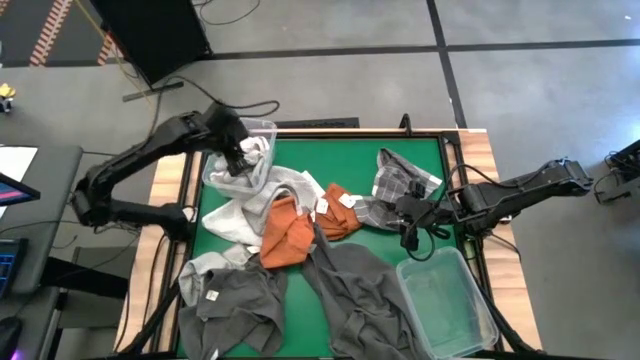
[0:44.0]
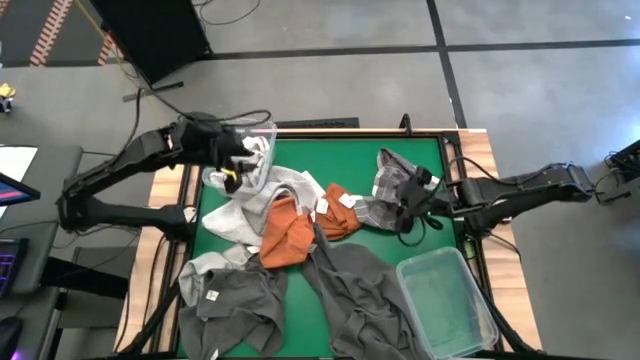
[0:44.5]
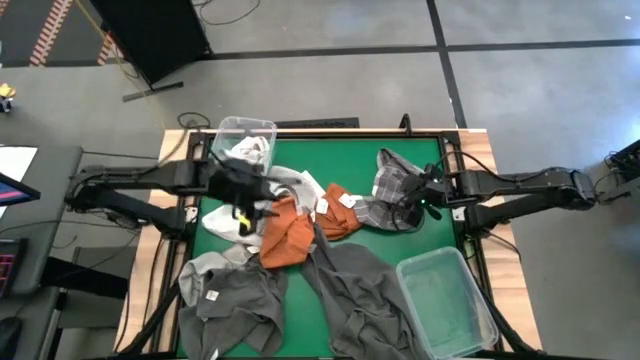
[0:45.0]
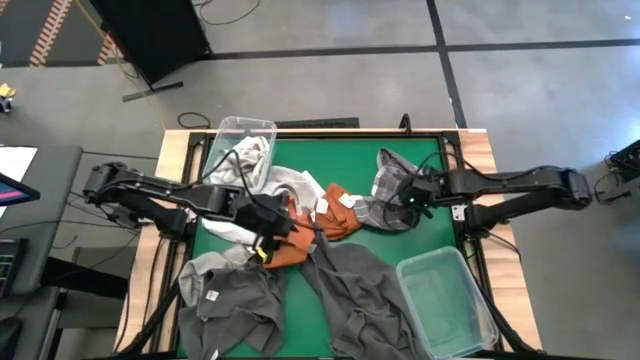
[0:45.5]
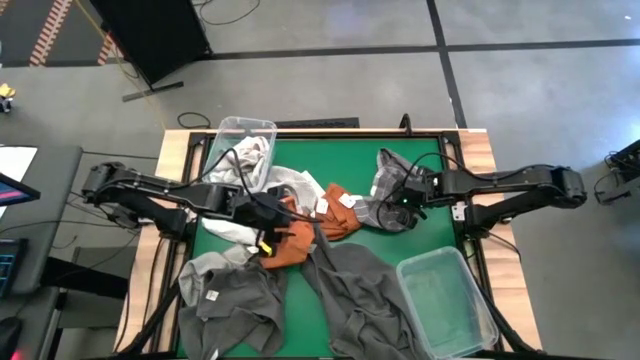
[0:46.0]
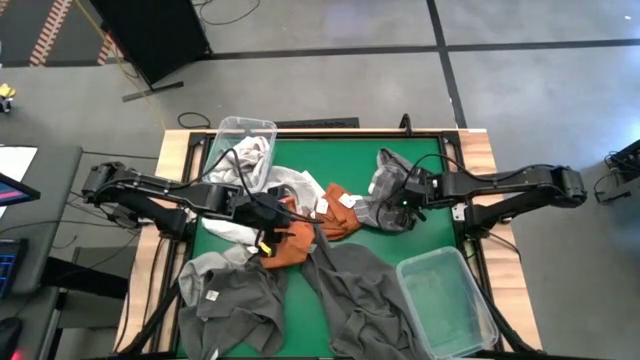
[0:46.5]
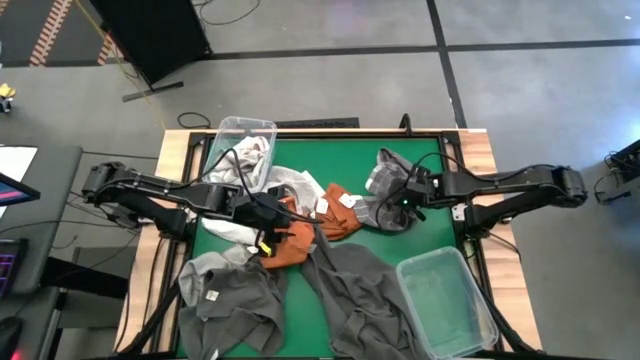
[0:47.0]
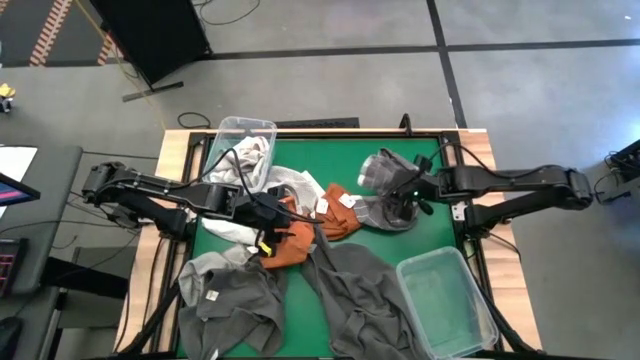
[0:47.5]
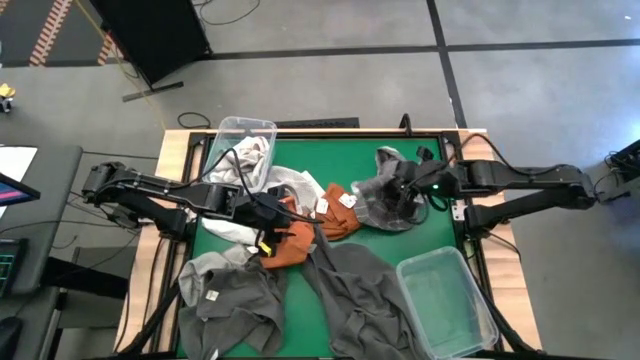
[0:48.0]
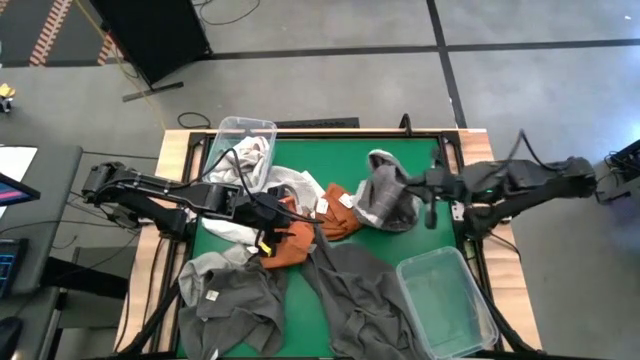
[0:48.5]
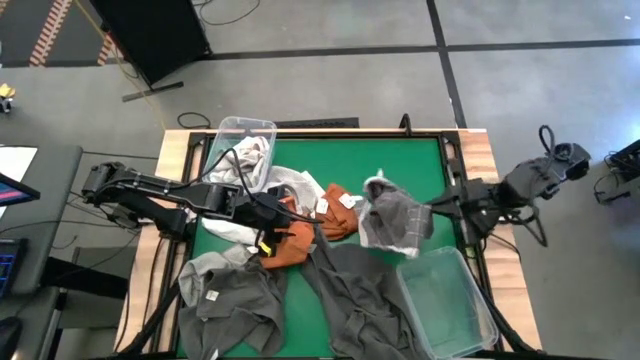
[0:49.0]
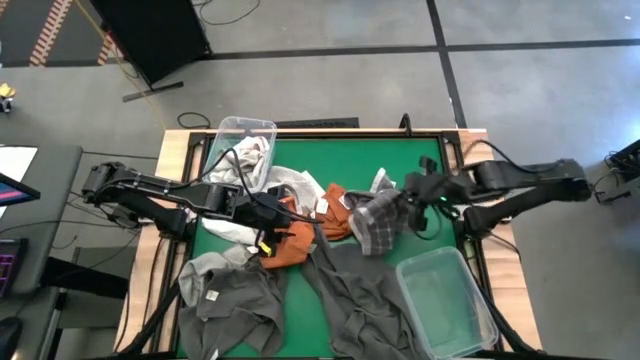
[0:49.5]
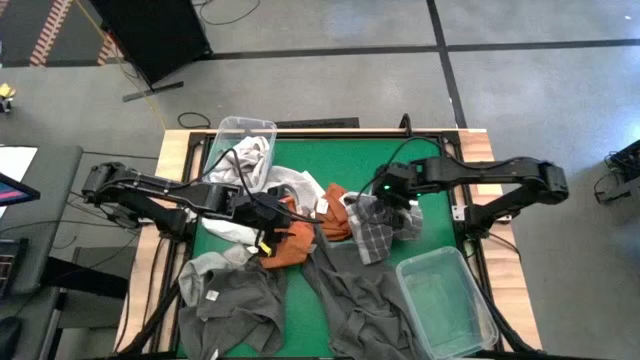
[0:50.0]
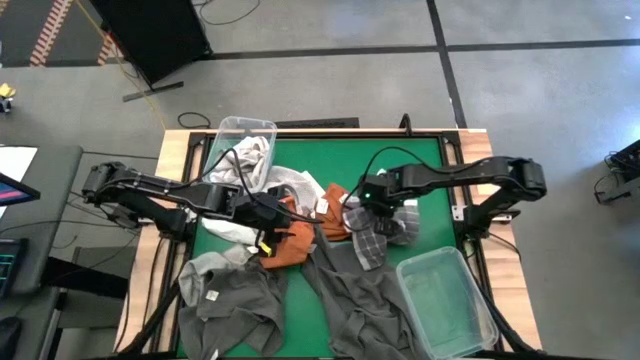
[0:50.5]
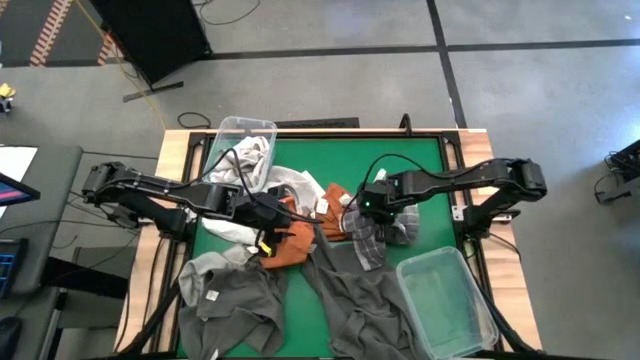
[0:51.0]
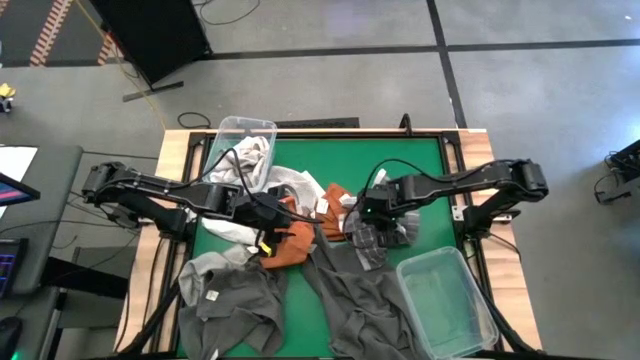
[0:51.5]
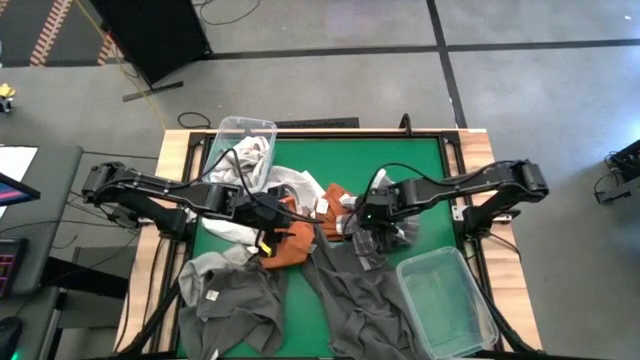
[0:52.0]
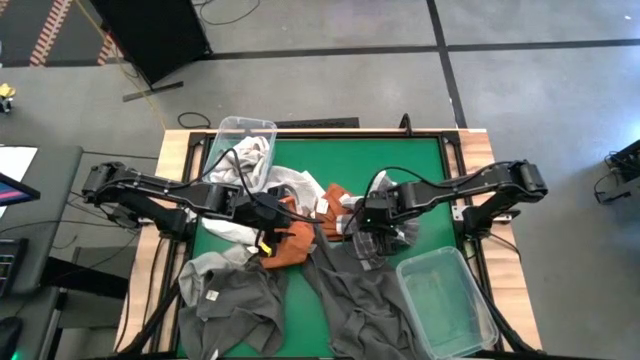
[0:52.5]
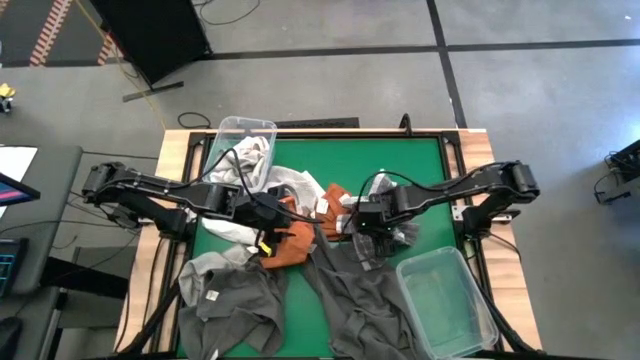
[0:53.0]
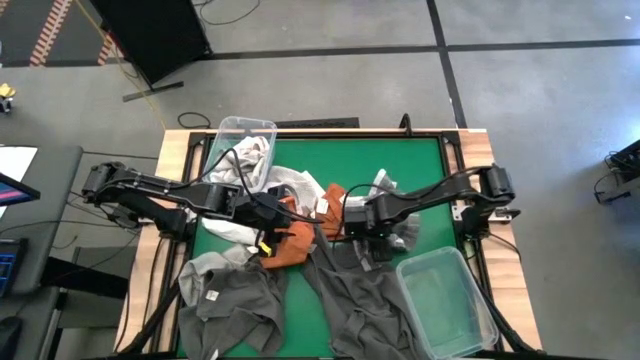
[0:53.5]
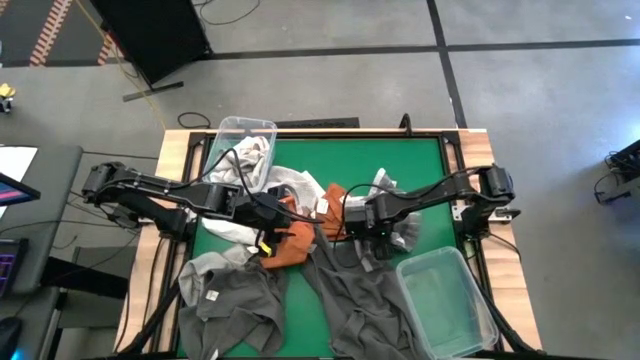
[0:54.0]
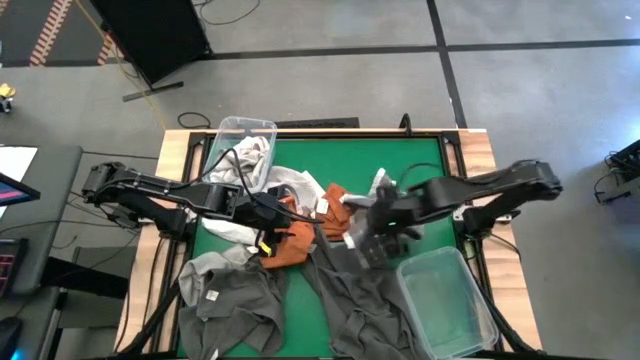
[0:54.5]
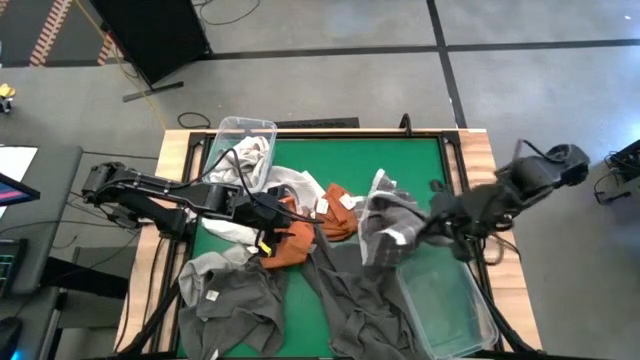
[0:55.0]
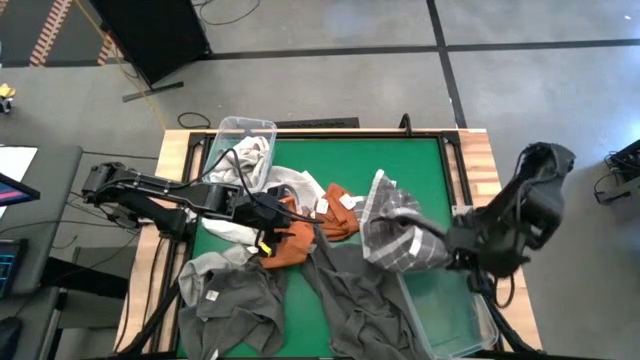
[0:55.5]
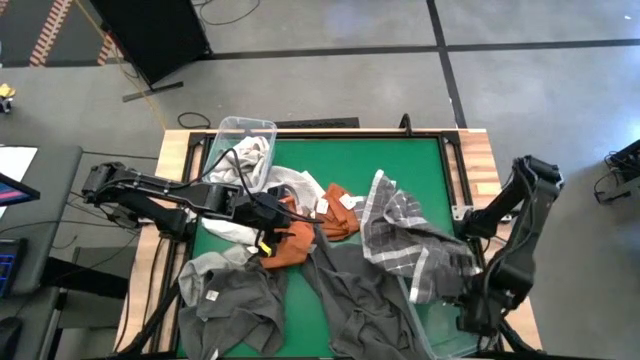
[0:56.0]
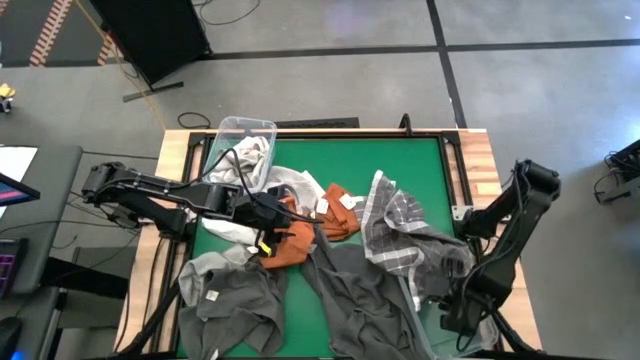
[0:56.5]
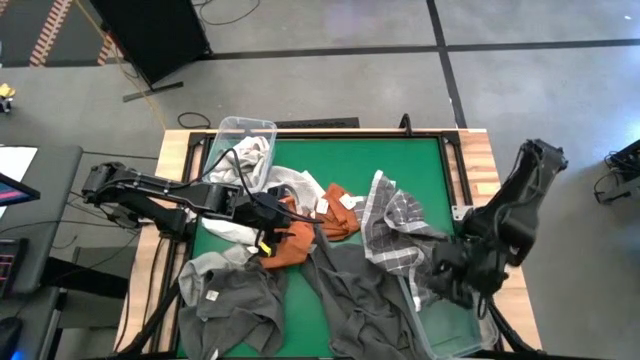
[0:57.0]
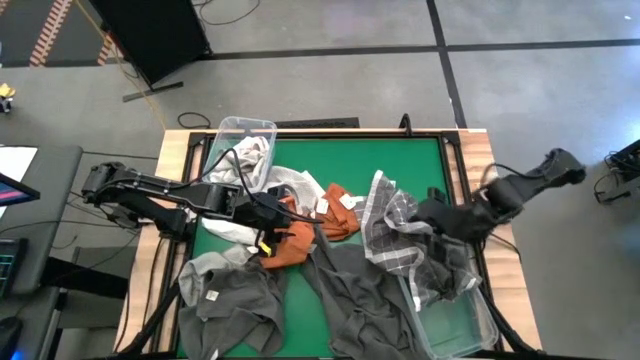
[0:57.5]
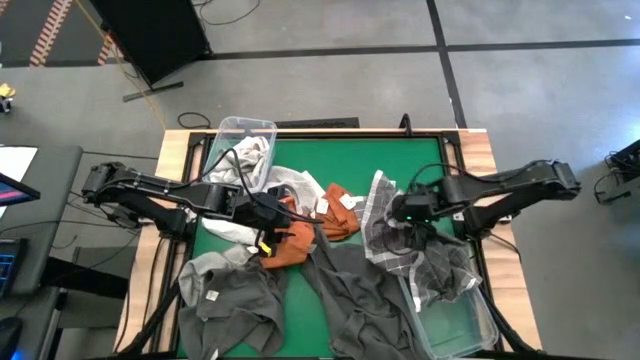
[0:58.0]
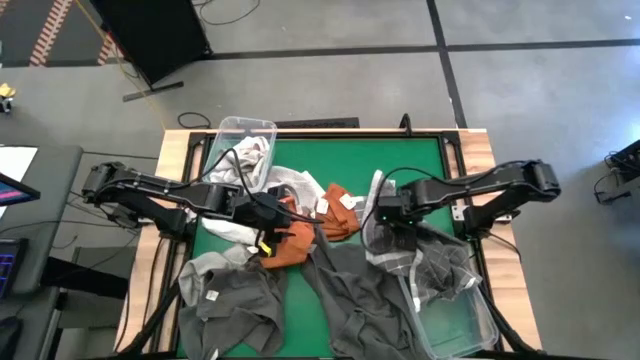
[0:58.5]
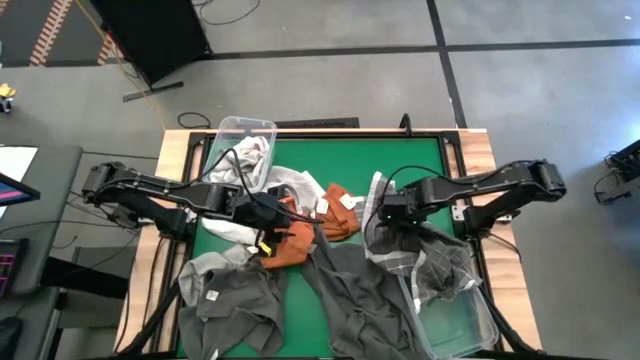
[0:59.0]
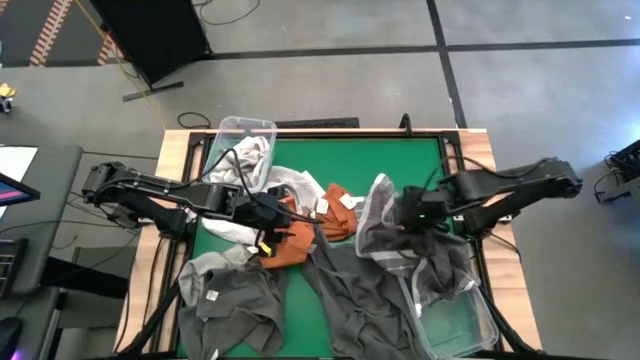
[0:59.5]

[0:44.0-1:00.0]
Task: Sort towels by color in basket
Put the gray patterned towel into the bottom transparent bin

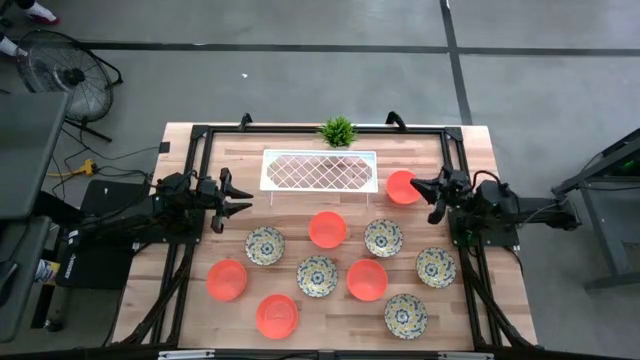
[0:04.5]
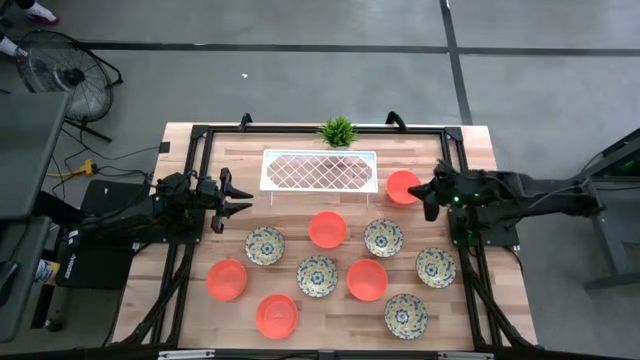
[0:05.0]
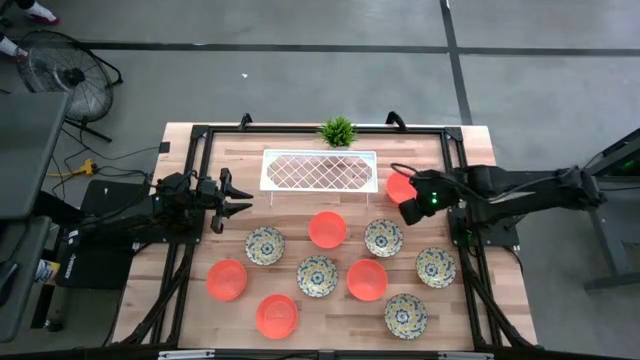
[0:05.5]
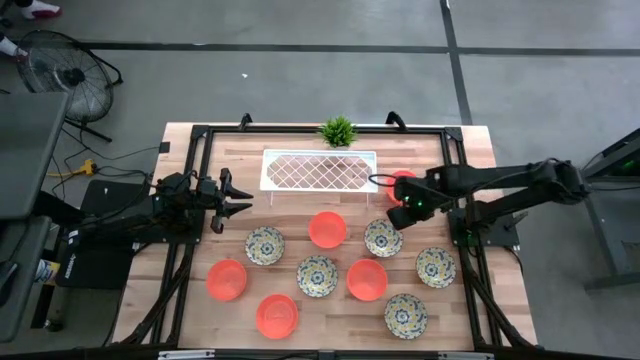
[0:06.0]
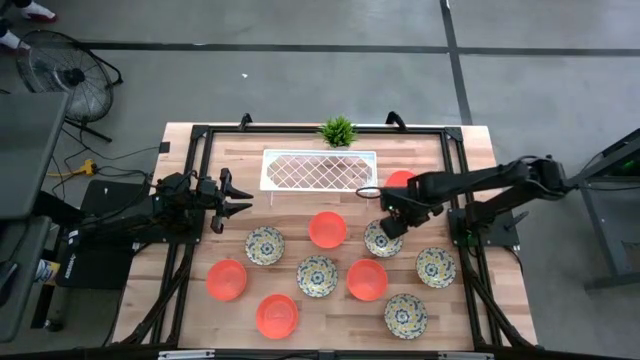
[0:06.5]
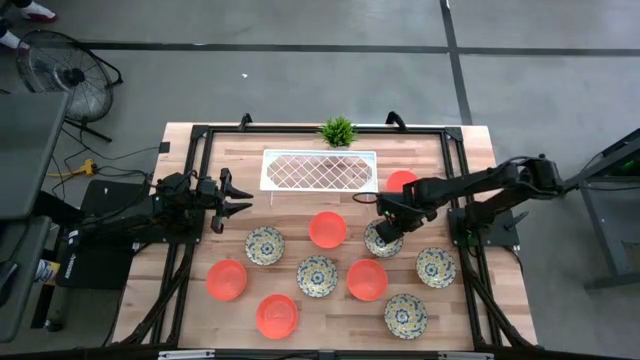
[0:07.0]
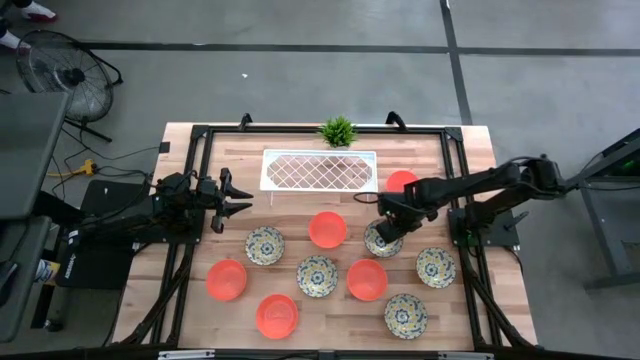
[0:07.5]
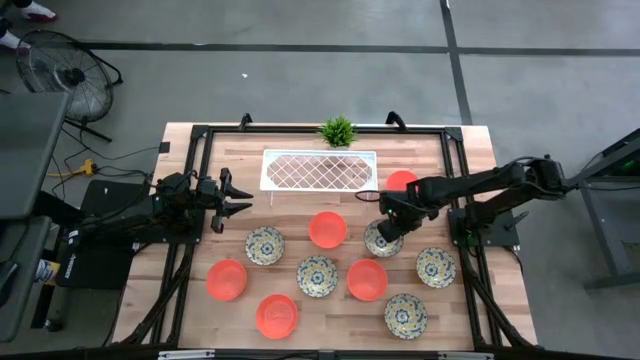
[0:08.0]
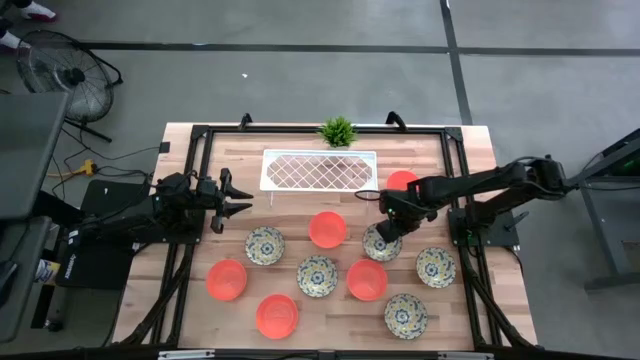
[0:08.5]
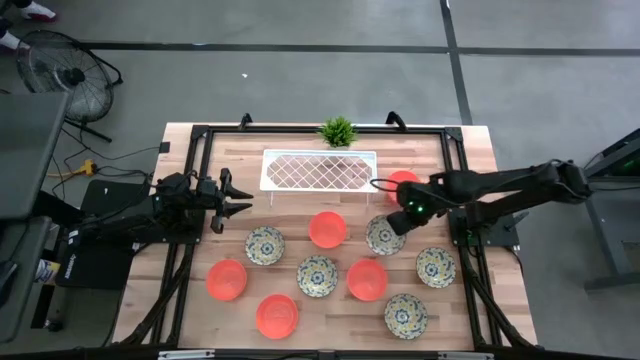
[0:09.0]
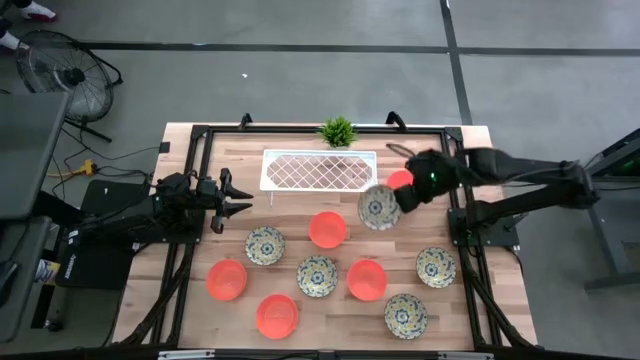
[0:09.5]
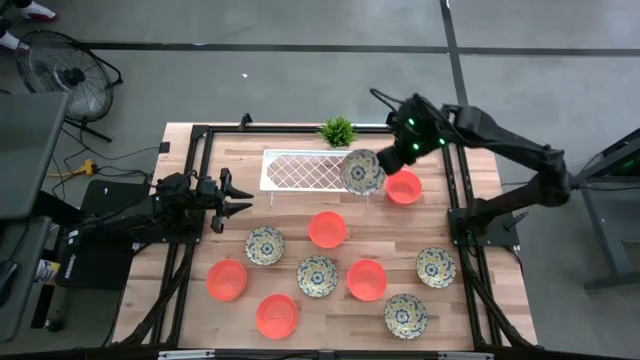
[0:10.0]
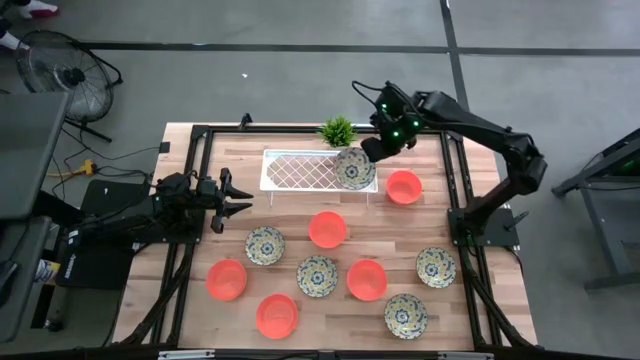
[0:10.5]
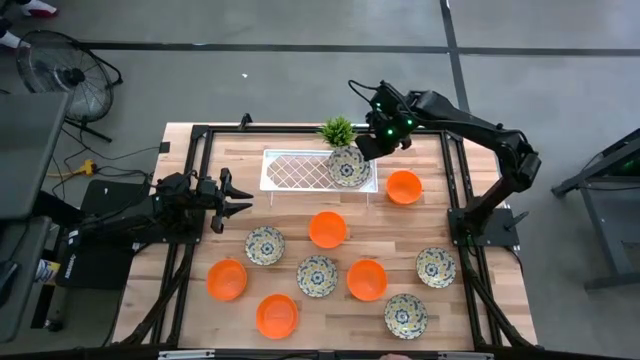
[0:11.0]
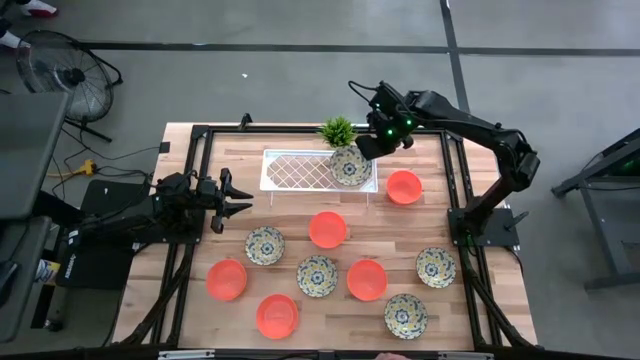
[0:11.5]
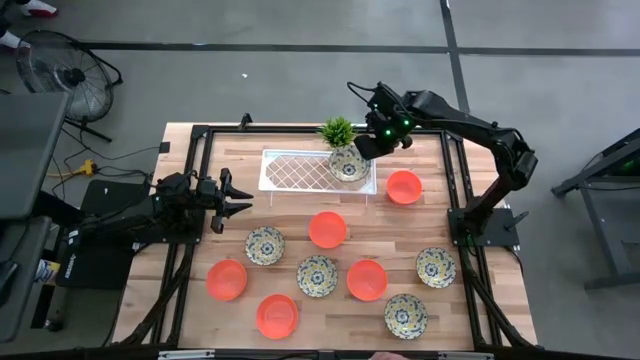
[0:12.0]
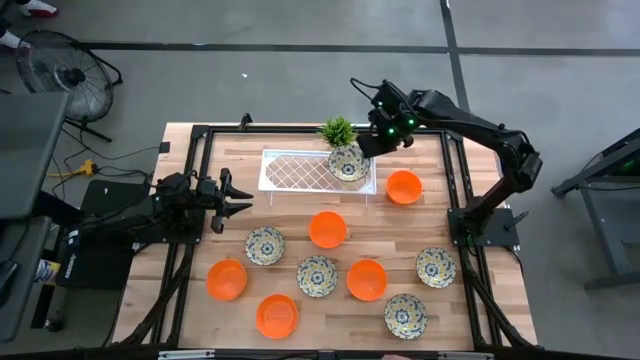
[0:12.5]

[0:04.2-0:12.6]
Task: Pick & Place Mini bowls
Put the yellow bowl on the shelf
